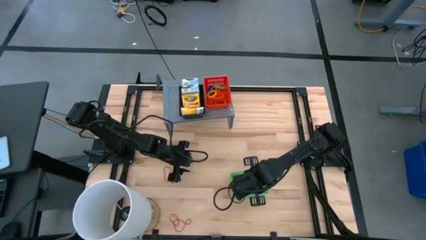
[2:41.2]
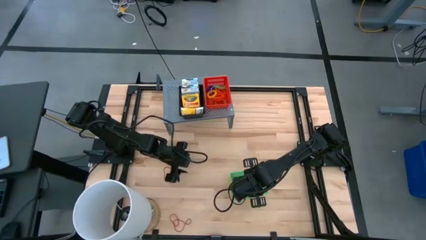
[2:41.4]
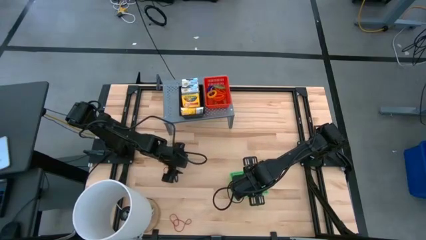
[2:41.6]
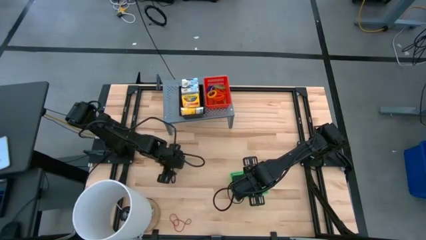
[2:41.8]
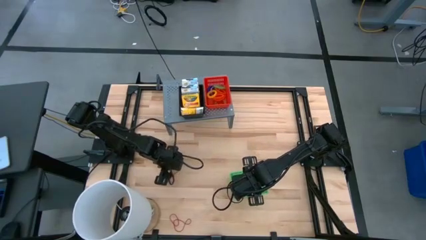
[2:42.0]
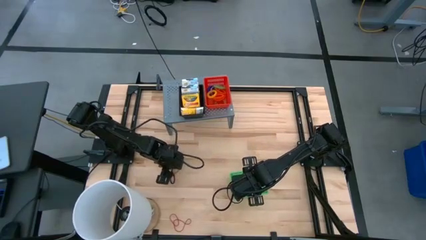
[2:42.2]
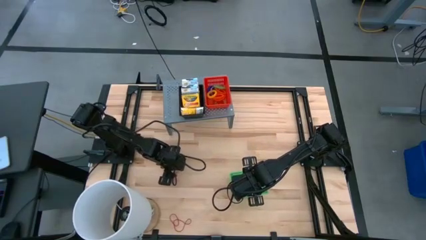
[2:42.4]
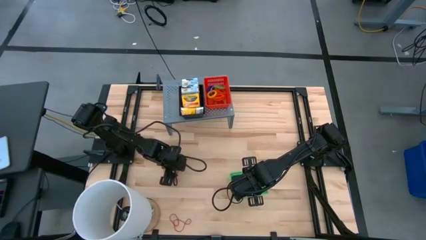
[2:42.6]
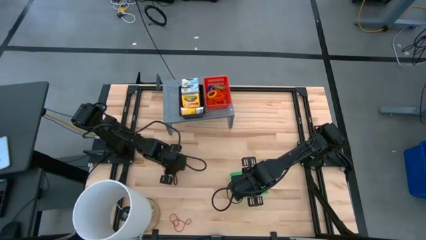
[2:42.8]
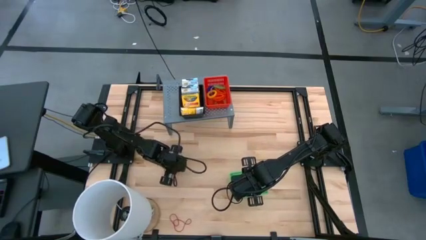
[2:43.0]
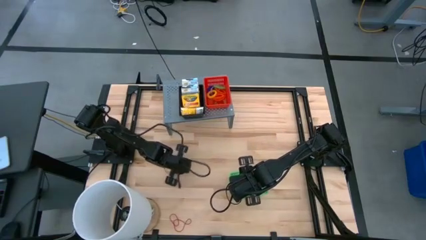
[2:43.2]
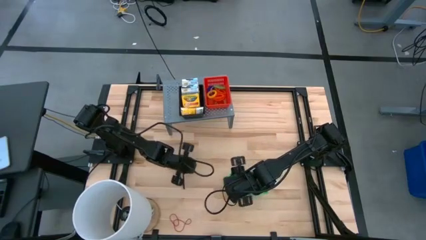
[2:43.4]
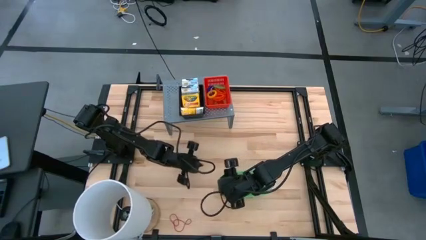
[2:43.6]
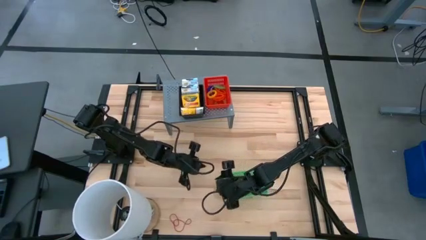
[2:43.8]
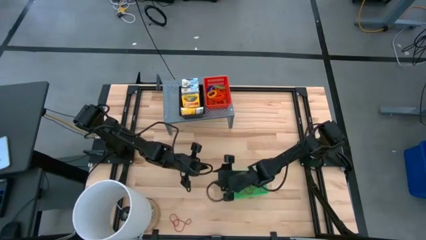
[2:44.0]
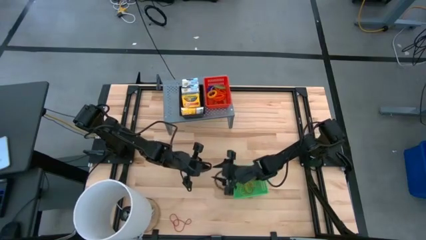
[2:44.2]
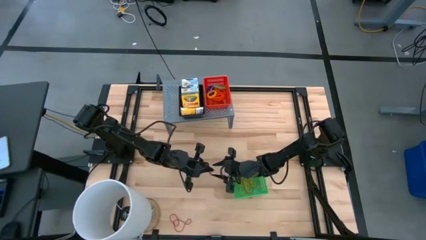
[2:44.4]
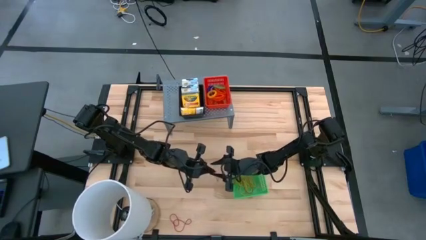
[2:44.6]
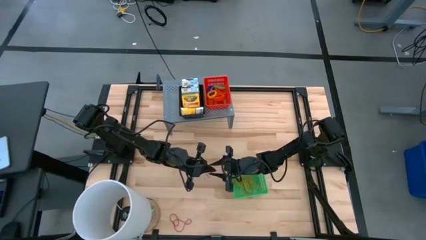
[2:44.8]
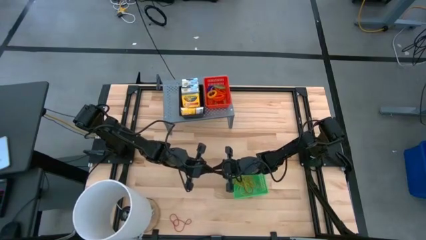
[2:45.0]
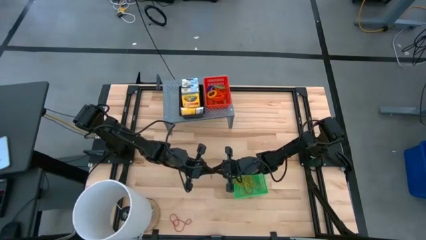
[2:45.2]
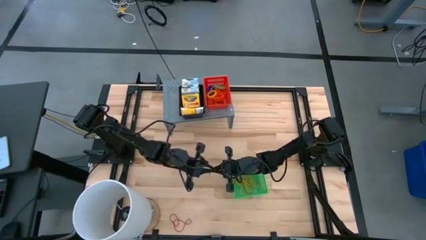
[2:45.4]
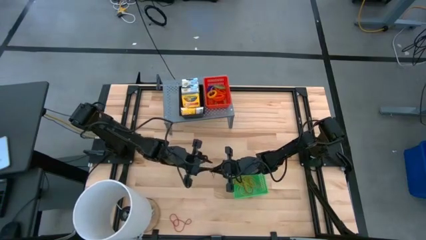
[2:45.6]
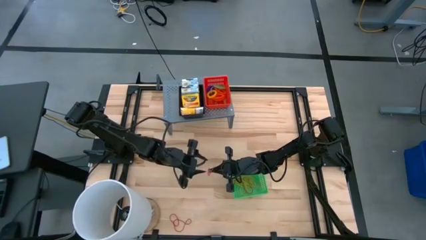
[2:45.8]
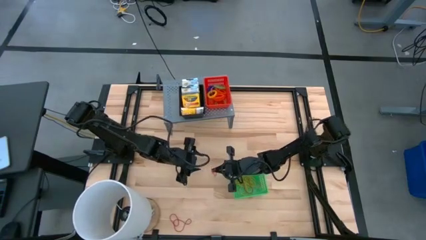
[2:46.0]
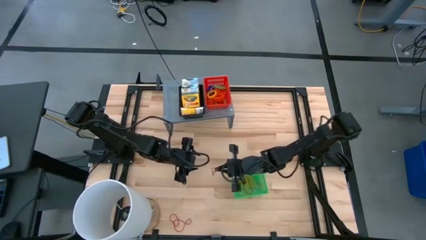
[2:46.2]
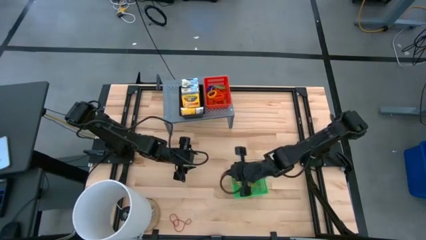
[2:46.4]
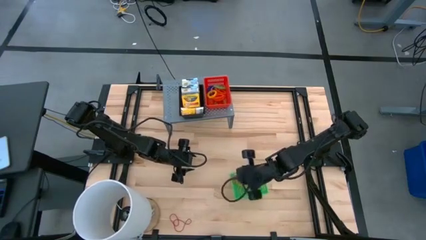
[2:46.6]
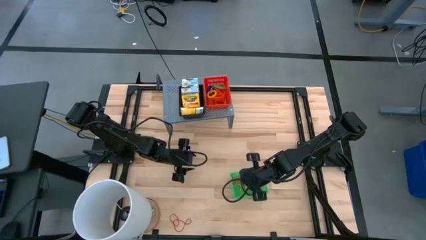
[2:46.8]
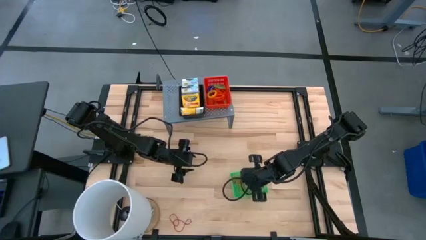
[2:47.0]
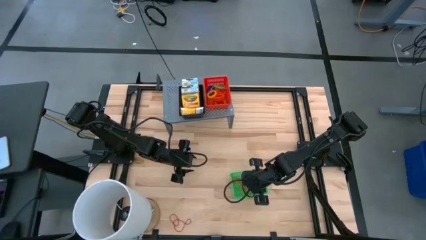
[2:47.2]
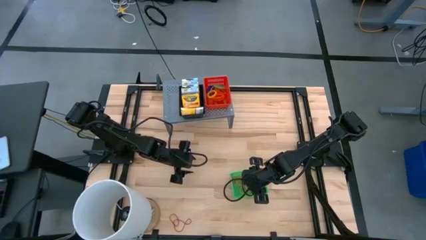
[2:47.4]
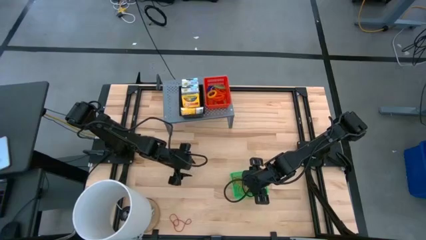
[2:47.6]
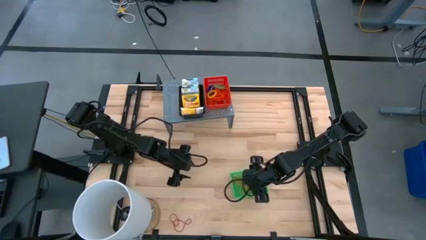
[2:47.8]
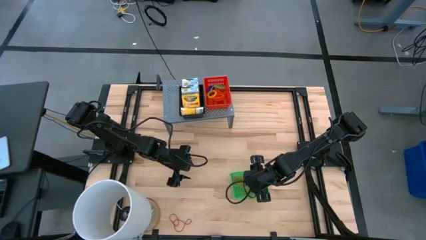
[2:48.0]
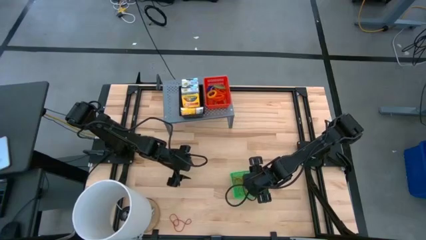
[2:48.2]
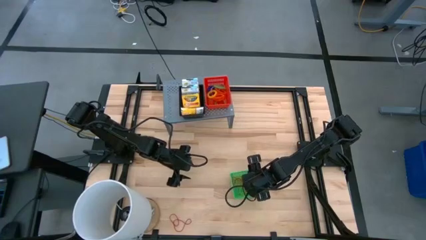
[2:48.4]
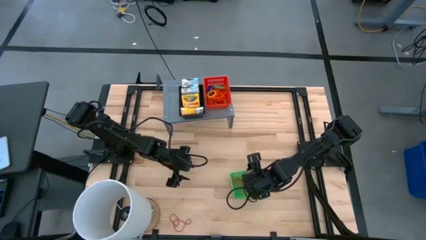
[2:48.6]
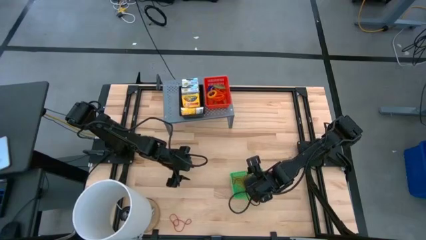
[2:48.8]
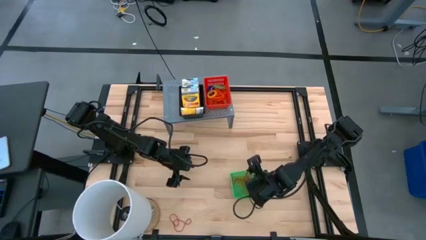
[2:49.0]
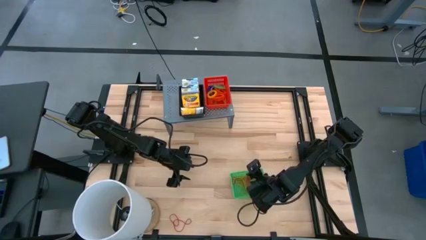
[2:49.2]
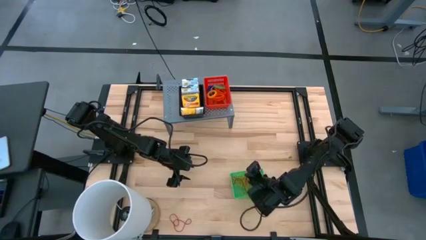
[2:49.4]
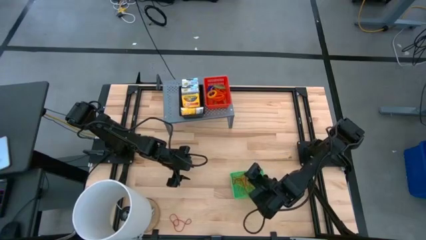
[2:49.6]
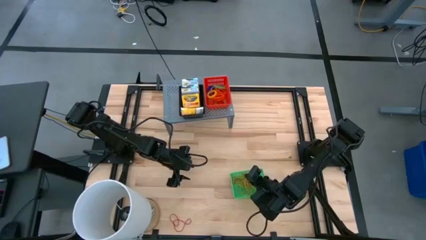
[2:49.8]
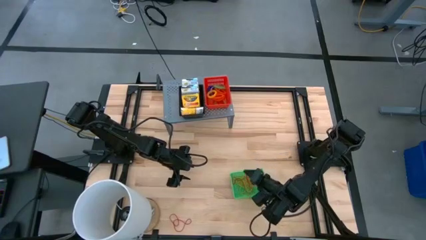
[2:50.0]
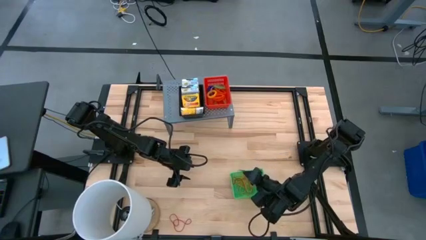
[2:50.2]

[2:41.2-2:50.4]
Task: Pick & Place Office Desk Supplies
Put the top red rubber band into the green bin

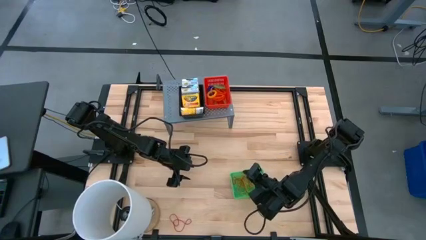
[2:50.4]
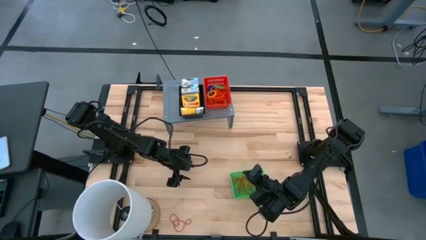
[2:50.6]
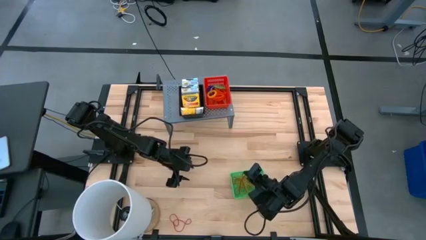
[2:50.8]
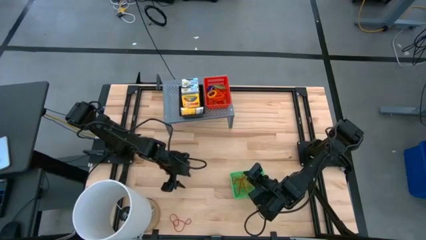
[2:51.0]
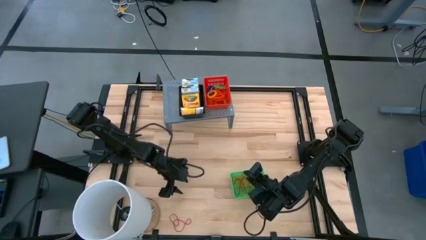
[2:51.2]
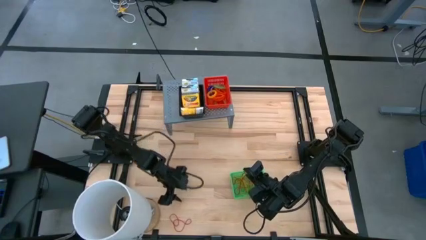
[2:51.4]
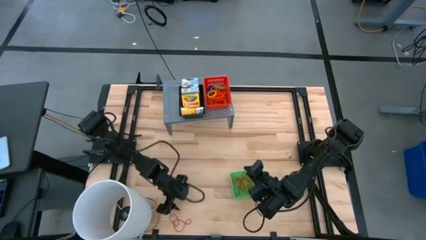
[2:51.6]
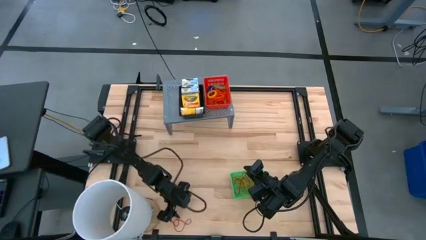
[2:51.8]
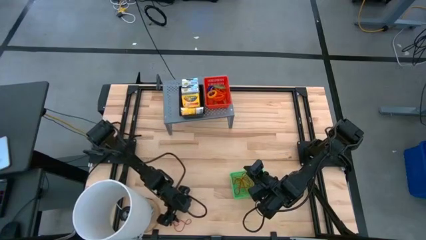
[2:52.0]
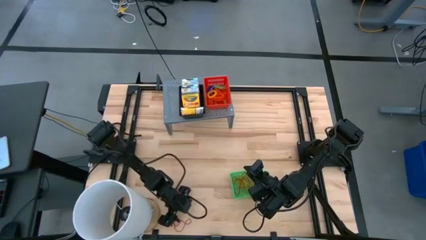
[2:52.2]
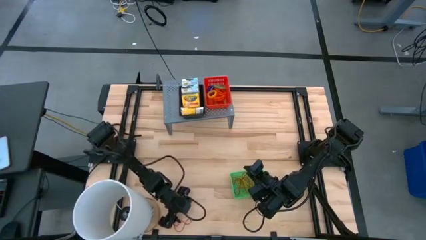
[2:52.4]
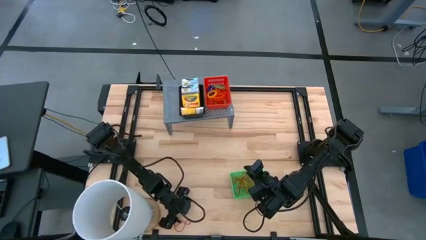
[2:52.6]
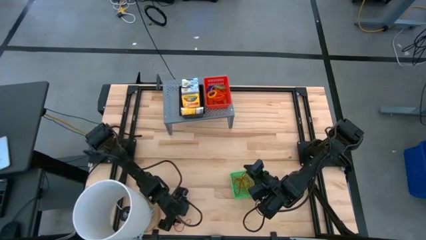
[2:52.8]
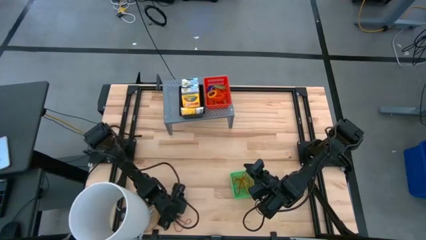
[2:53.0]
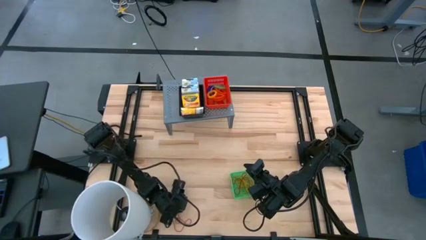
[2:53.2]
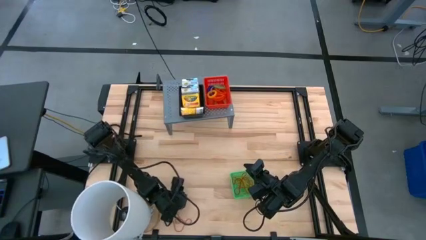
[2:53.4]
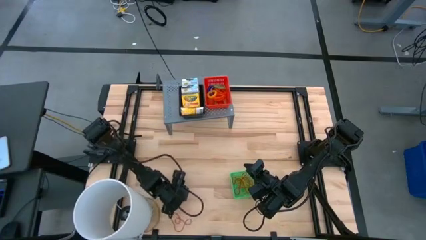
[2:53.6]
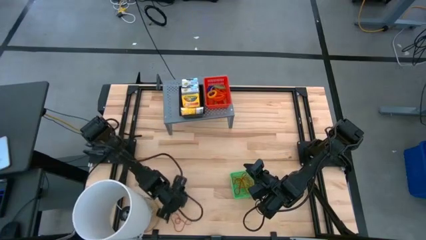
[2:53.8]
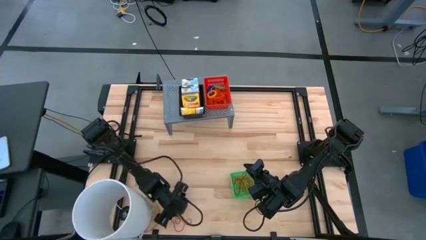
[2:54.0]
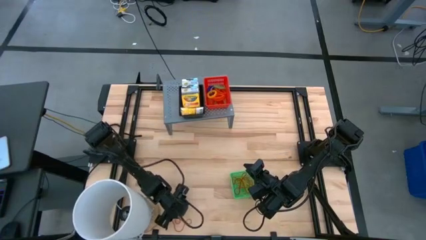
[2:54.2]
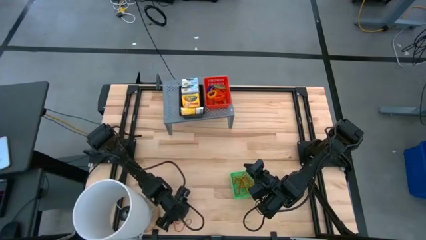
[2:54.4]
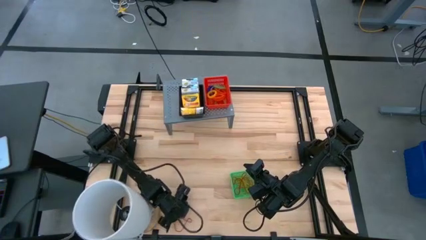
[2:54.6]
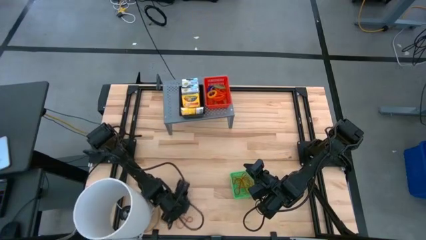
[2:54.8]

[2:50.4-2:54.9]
Put the red rubber band into the green bin

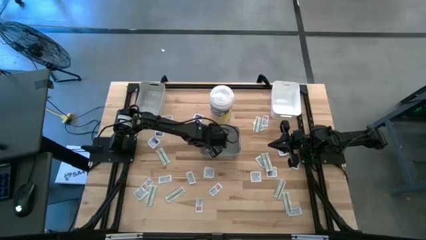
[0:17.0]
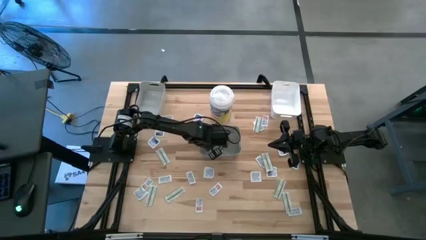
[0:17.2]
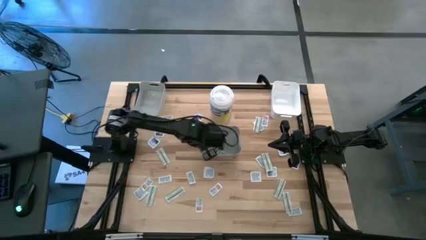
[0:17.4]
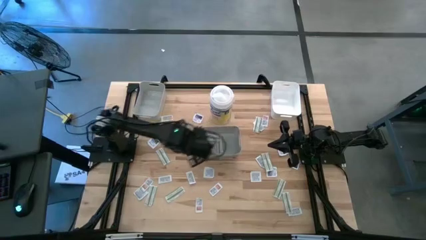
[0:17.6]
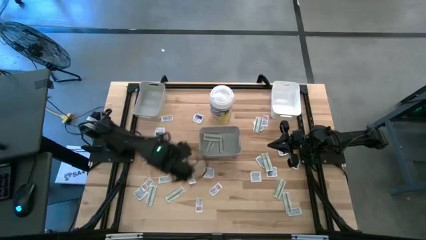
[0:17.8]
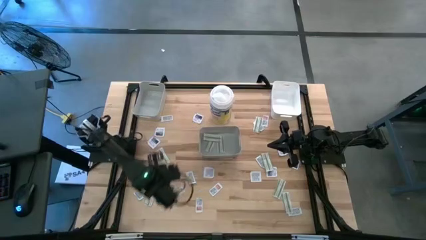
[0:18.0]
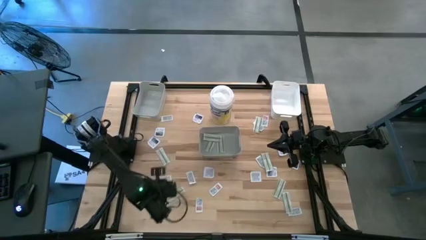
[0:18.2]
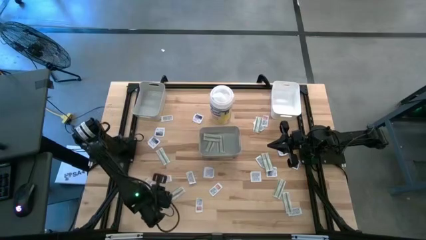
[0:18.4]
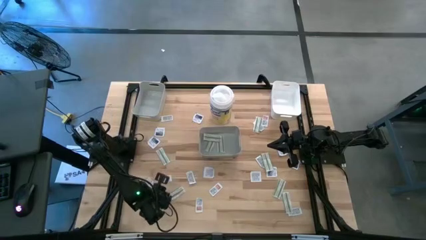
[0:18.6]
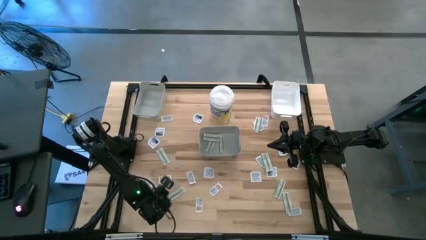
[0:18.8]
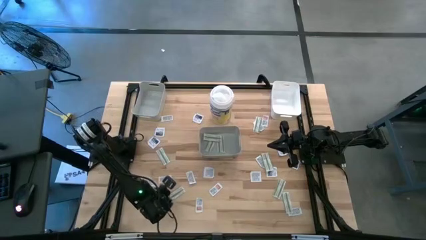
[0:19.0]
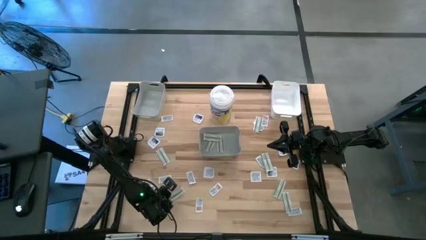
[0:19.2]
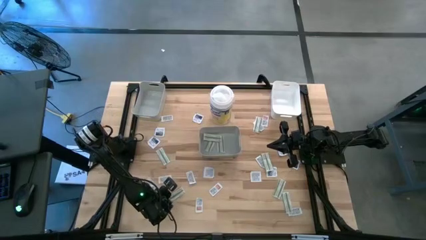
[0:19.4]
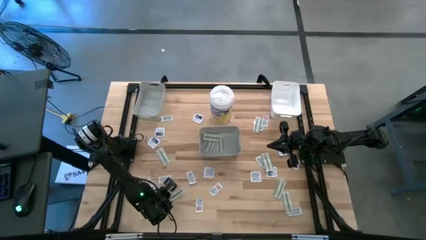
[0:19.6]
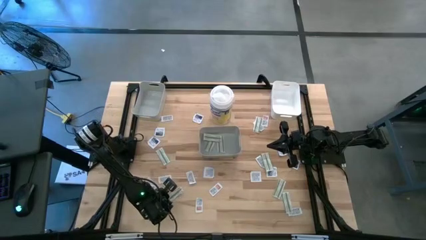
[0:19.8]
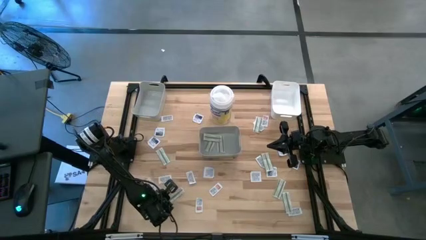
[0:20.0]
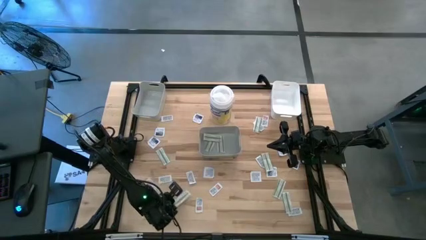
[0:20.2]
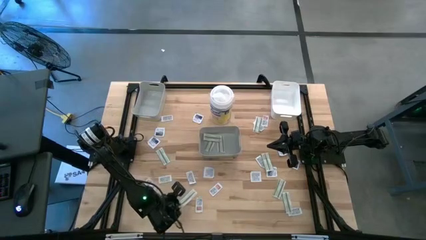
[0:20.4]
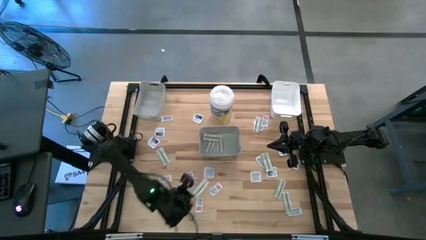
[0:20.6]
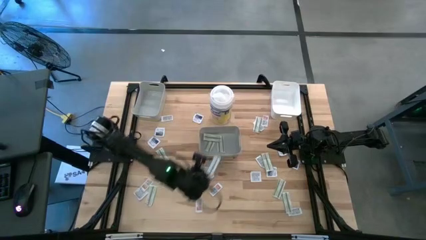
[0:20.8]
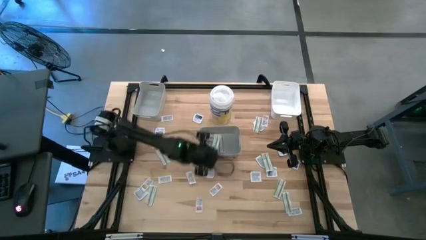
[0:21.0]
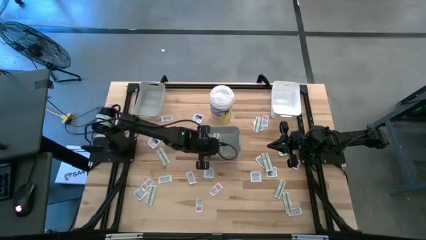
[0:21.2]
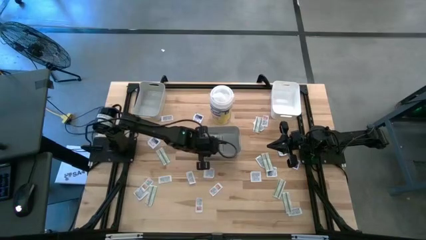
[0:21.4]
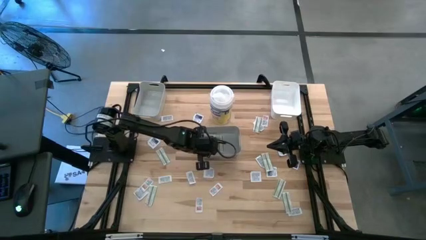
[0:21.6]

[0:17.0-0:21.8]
Task: Pick & Place First Aid Supplies
Put the bandage into the bottom gray bin
